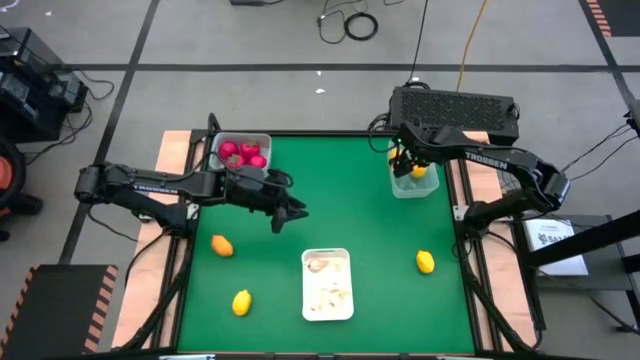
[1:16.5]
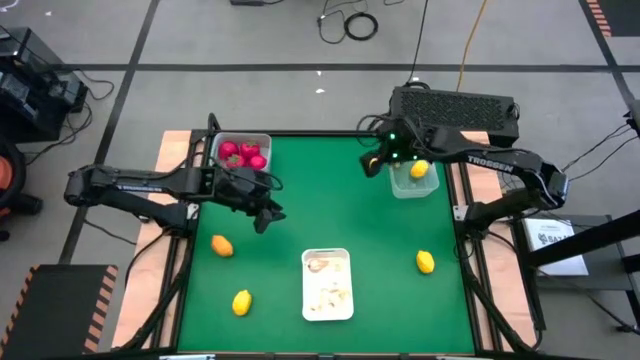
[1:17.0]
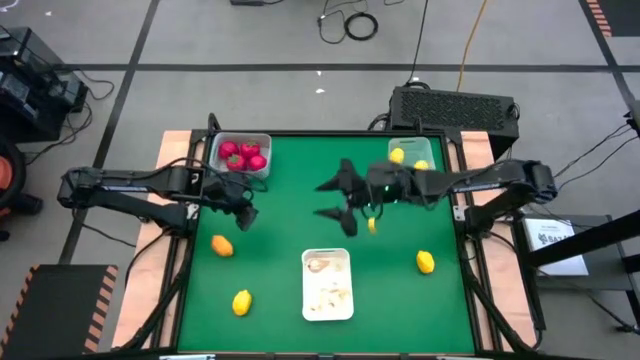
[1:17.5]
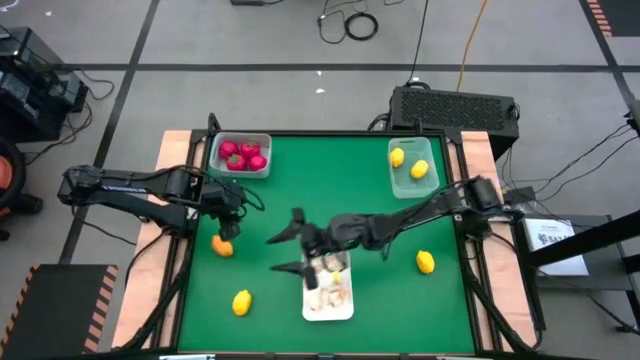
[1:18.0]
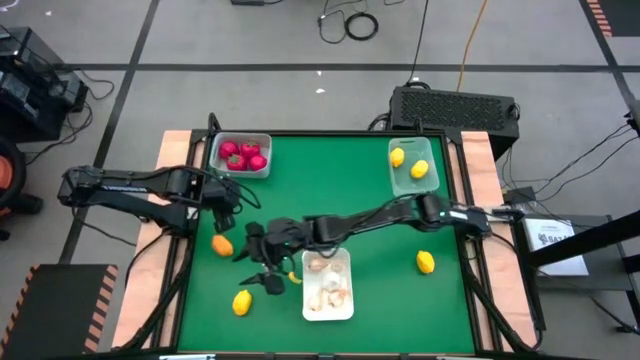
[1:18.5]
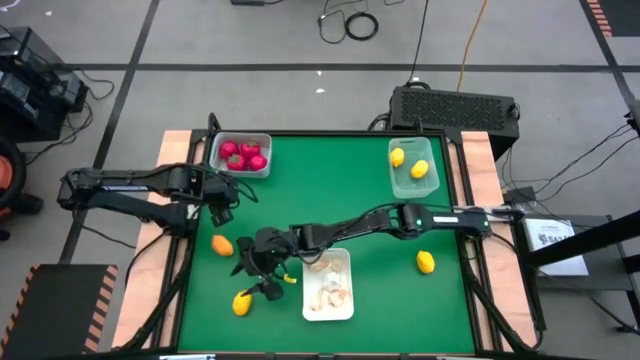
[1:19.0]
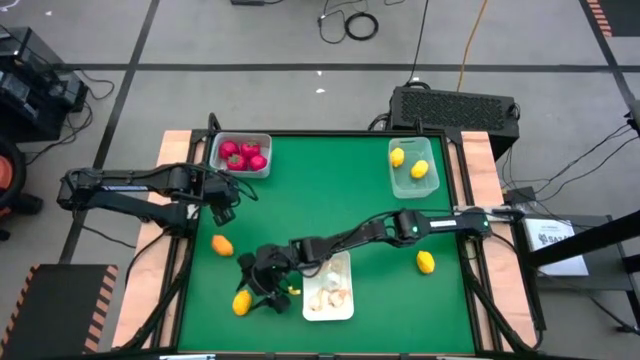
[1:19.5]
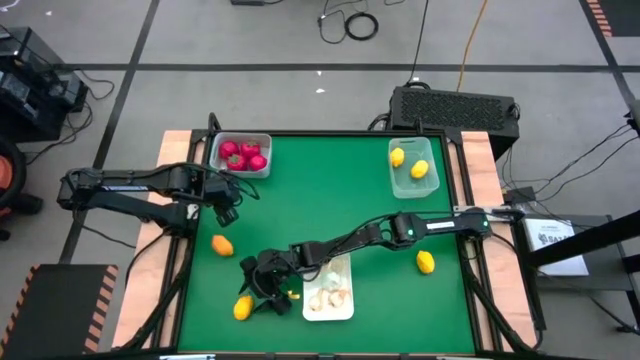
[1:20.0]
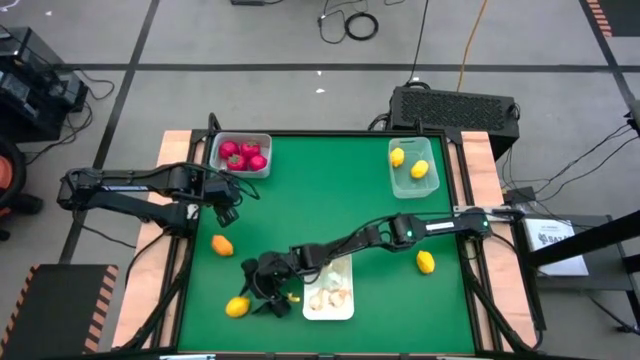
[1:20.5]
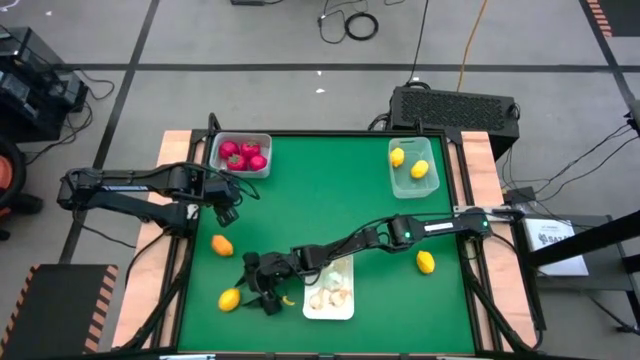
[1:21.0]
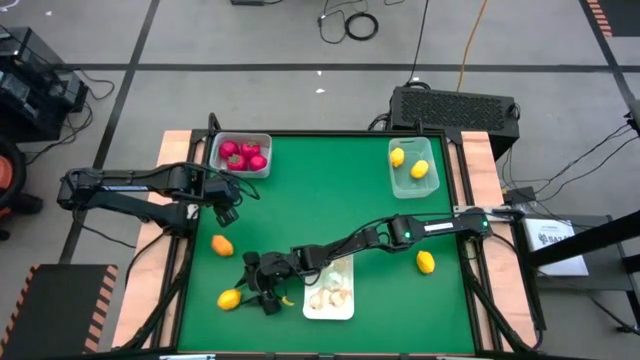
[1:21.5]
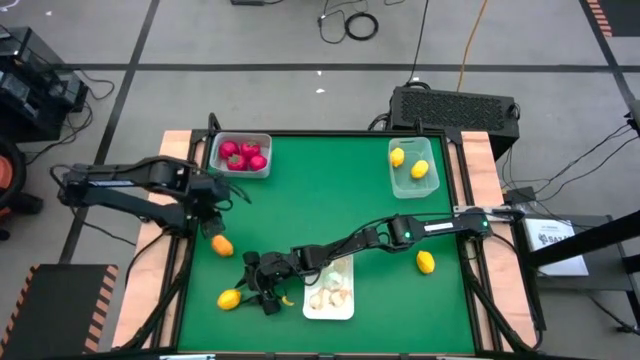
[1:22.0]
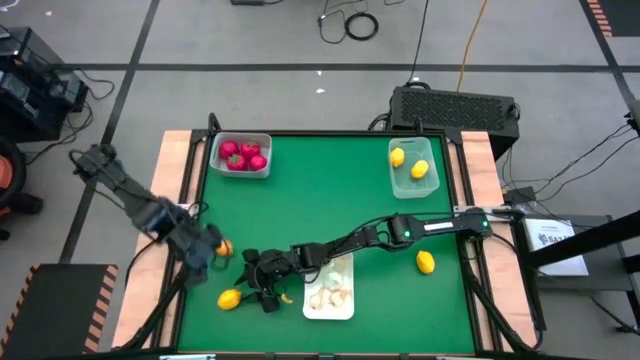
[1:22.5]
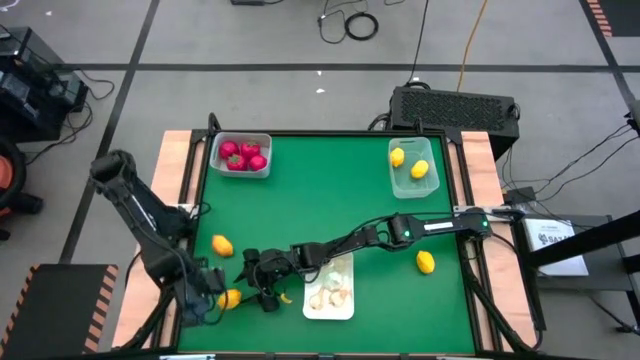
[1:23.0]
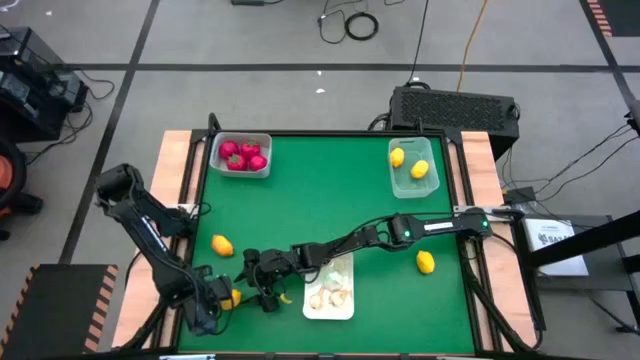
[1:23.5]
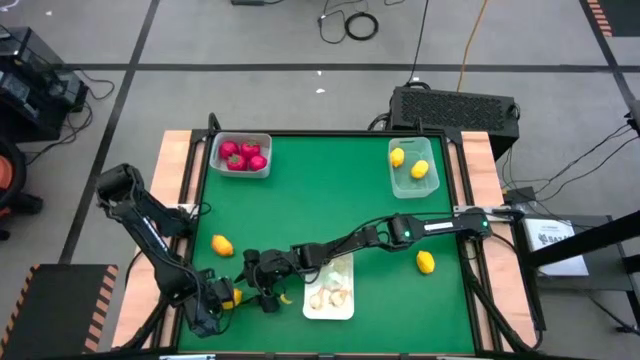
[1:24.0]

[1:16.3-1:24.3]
Task: Sort produce into baskets
Put the bottom left lemon into the transparent bin

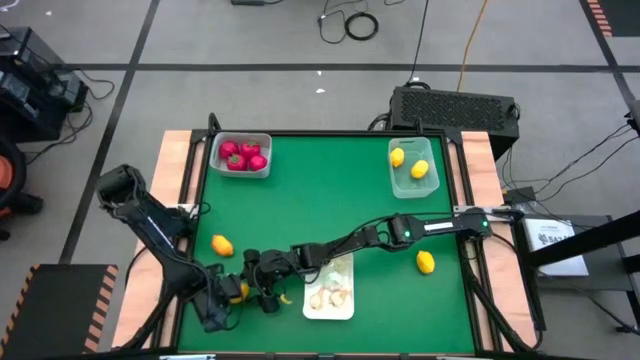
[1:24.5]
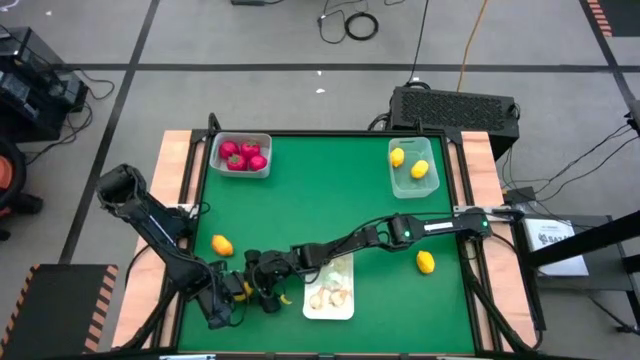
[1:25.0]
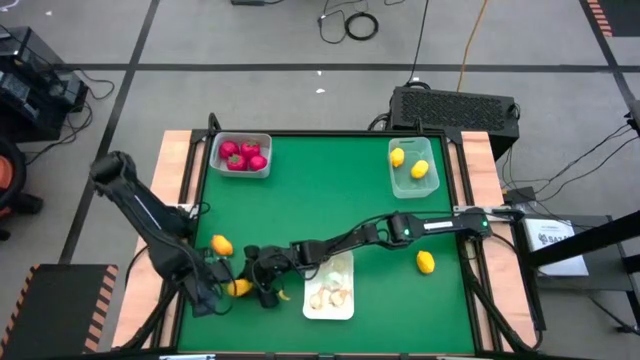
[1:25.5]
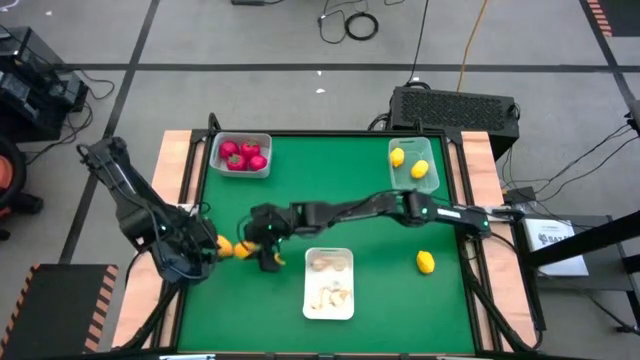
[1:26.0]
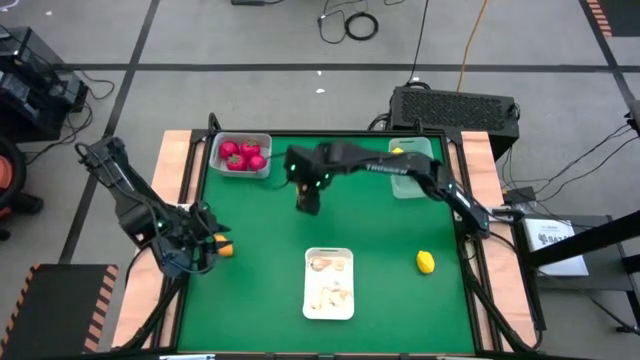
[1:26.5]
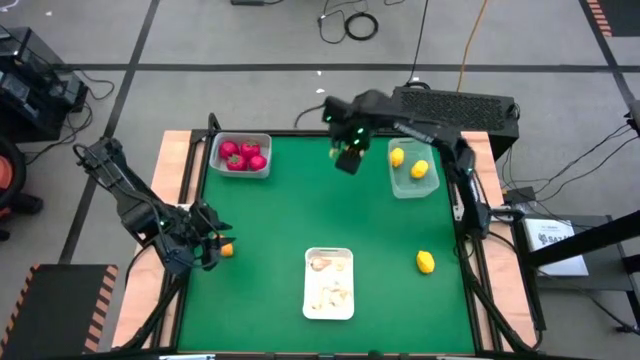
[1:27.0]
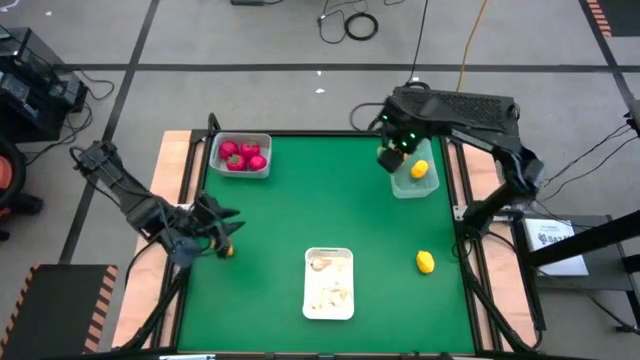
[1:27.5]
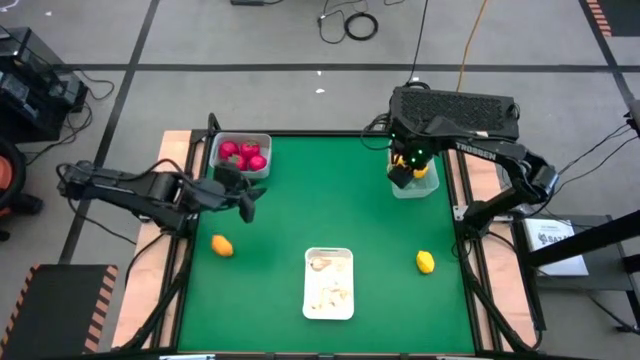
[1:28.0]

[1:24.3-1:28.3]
Put the bottom left lemon into the transparent bin

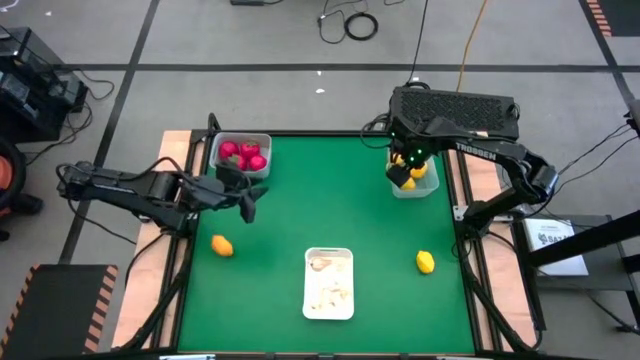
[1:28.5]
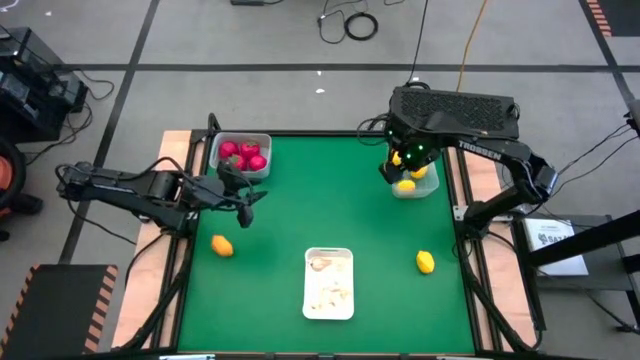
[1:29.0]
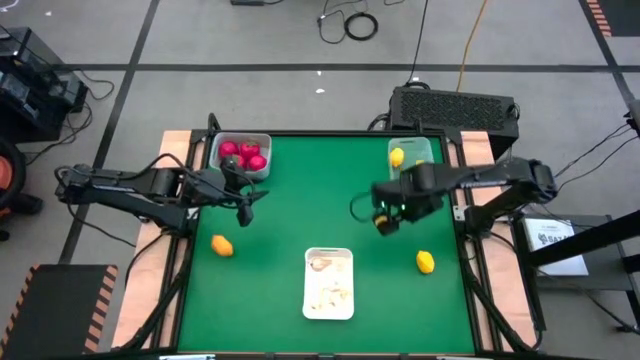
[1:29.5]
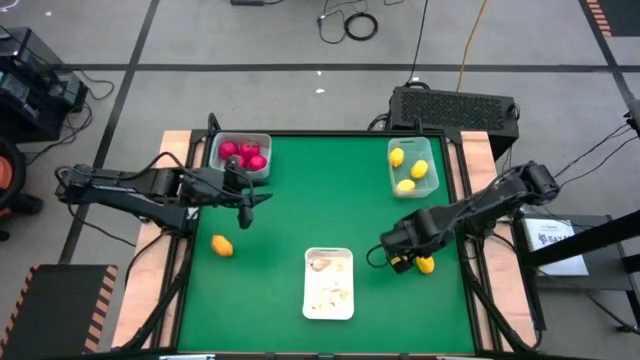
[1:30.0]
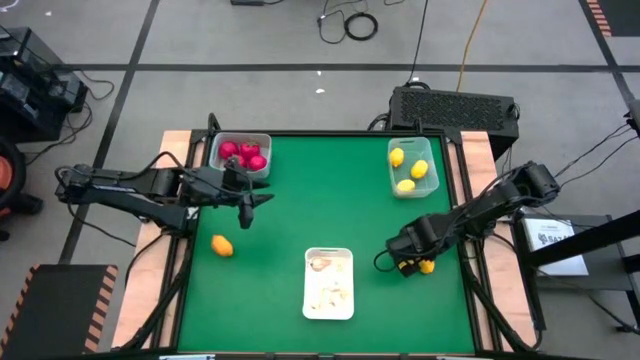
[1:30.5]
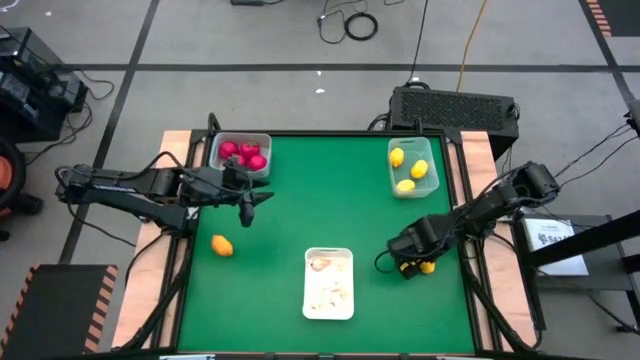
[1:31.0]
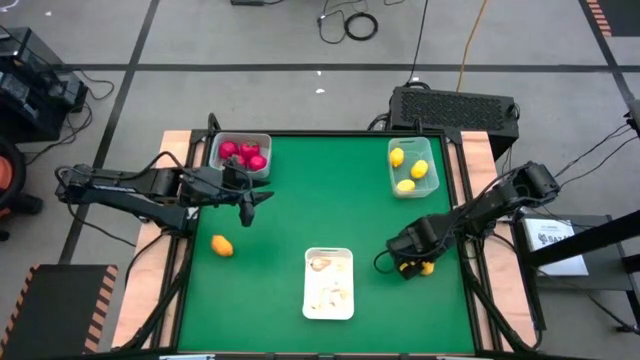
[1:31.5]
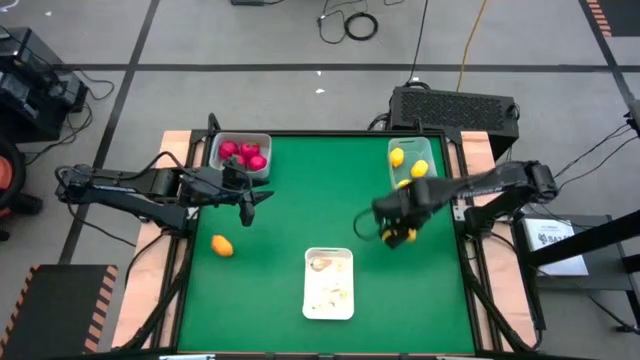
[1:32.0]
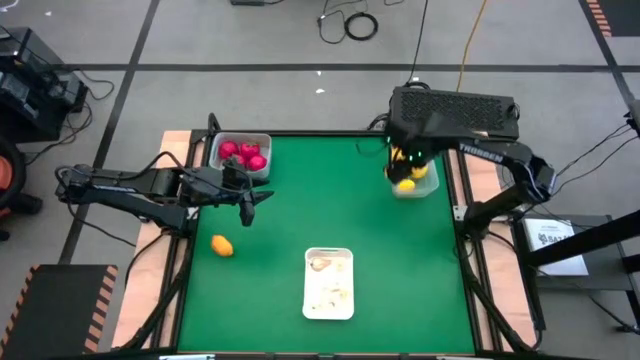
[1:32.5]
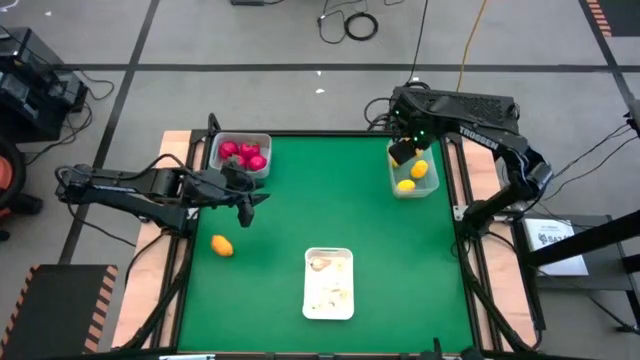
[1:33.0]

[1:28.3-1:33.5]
Put the right lemon into the transparent bin

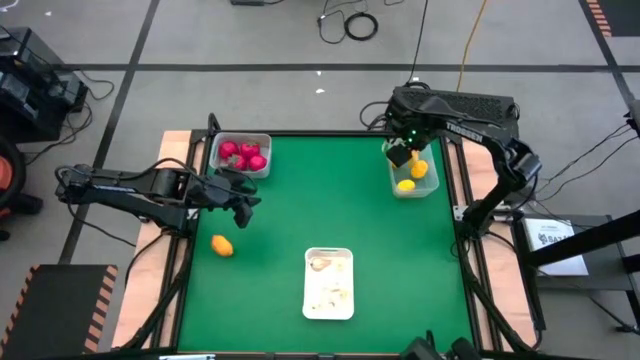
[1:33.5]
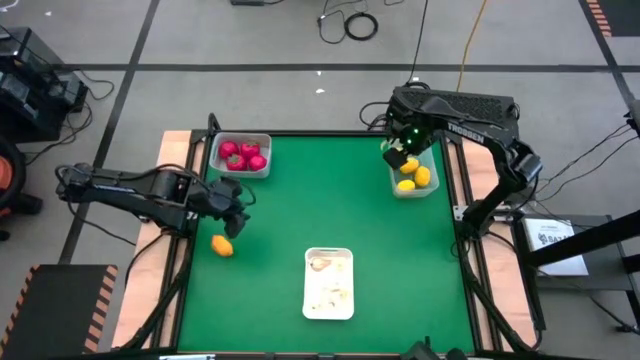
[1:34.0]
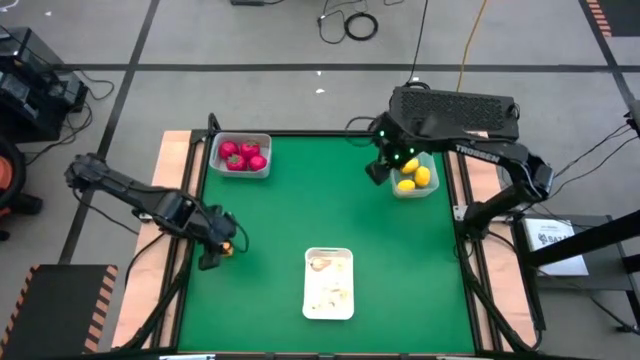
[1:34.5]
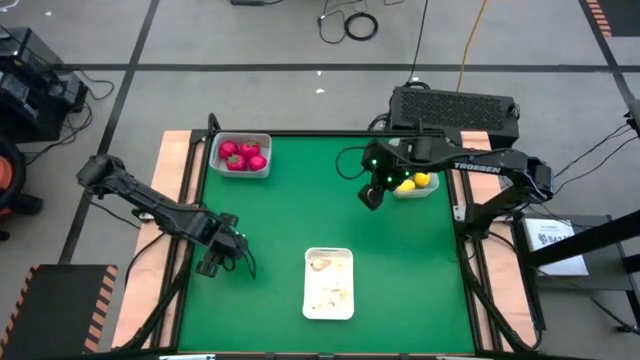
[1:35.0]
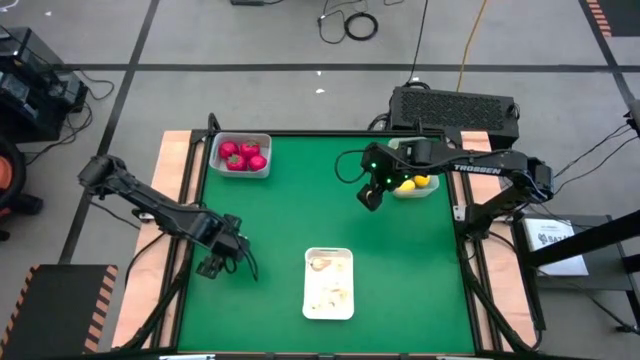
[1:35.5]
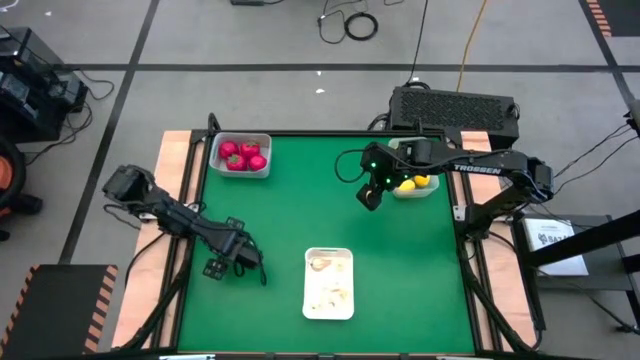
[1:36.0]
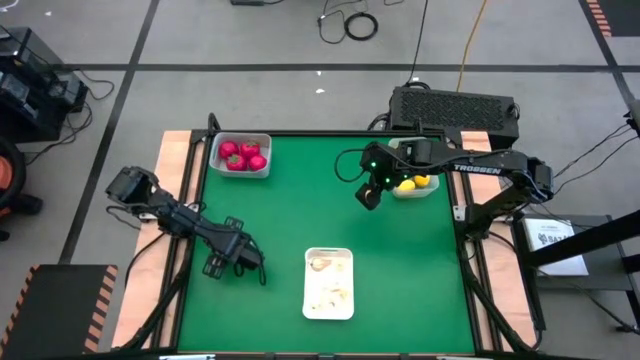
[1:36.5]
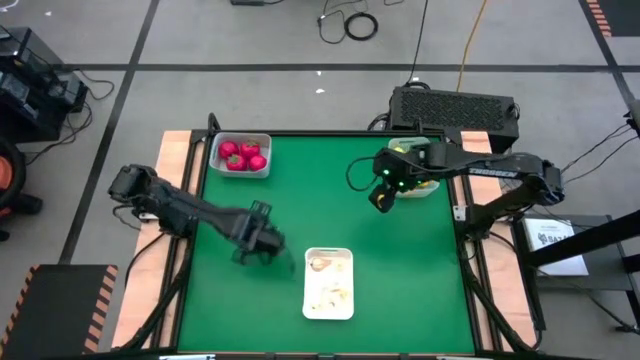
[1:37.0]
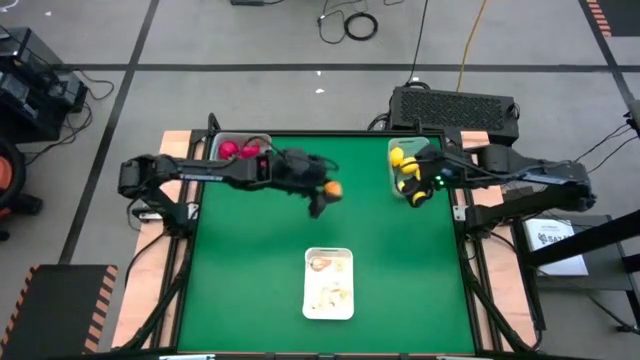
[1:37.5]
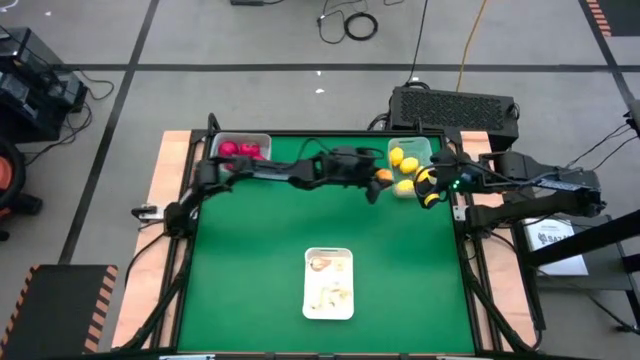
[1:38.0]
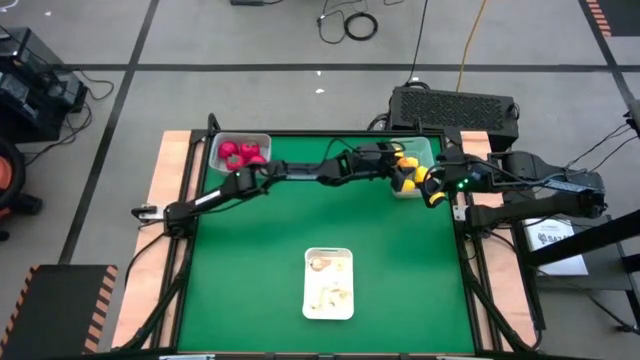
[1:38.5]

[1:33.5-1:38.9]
Put the lemon into the transparent bin
